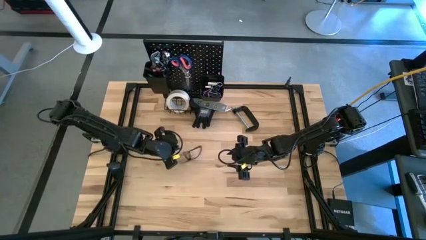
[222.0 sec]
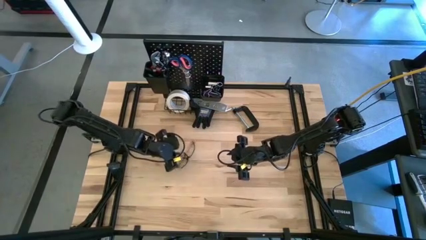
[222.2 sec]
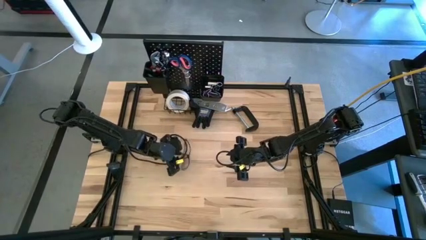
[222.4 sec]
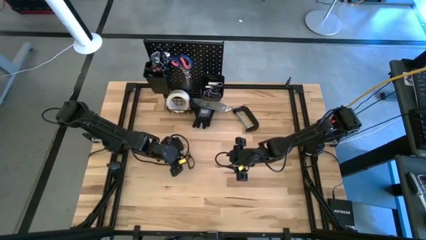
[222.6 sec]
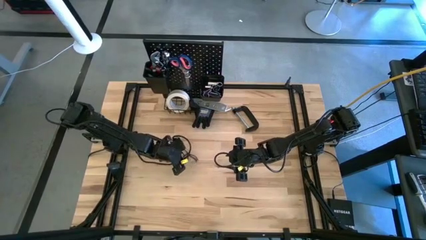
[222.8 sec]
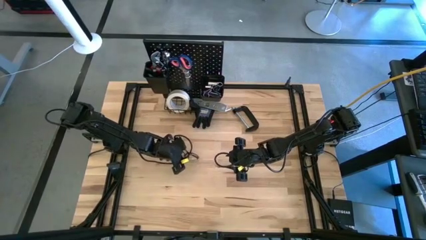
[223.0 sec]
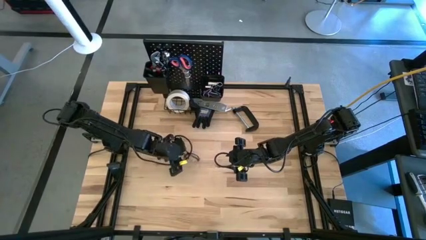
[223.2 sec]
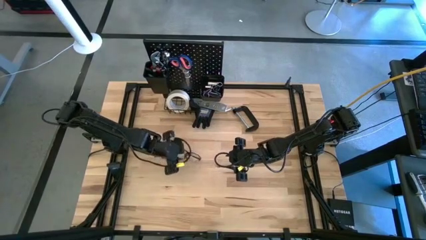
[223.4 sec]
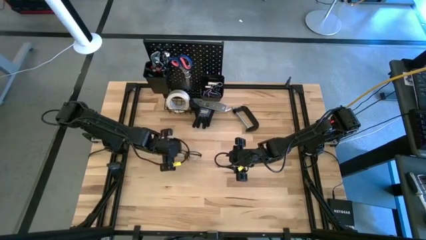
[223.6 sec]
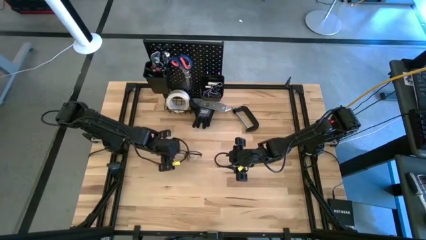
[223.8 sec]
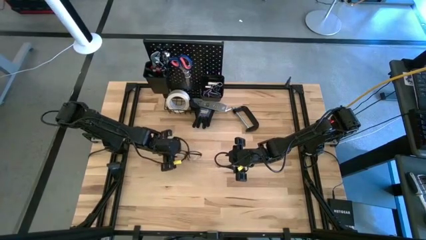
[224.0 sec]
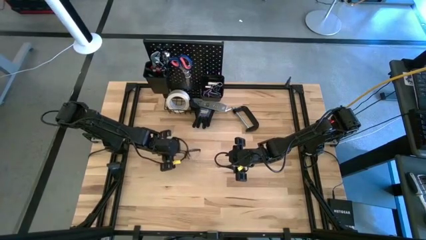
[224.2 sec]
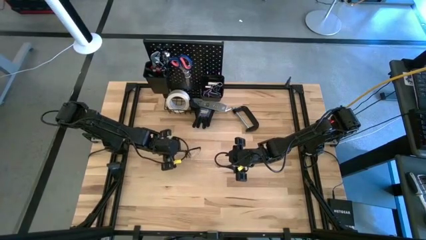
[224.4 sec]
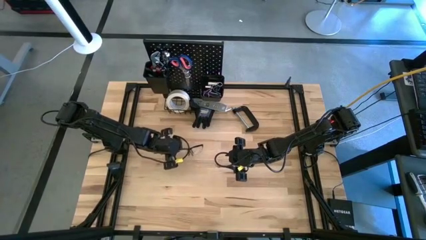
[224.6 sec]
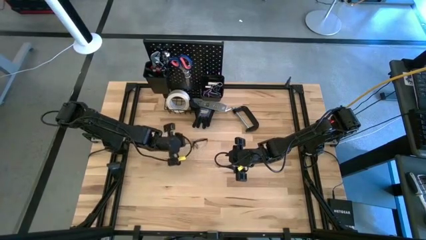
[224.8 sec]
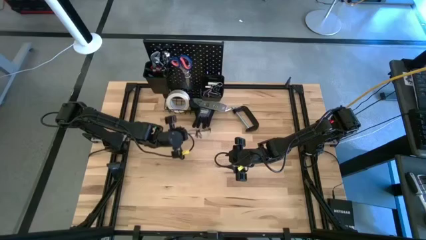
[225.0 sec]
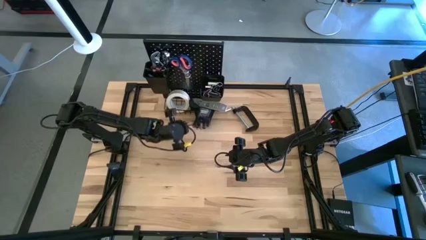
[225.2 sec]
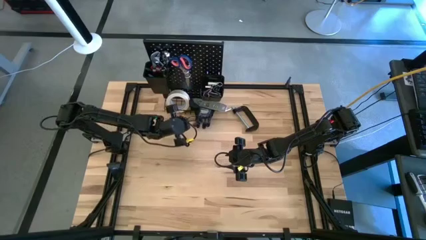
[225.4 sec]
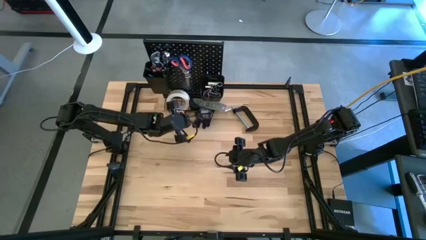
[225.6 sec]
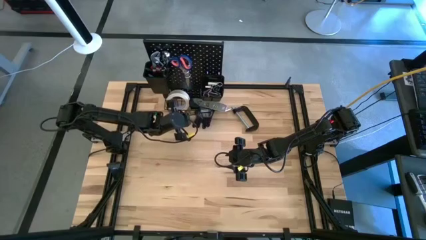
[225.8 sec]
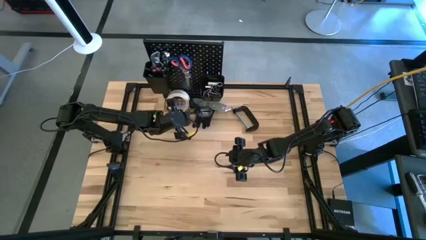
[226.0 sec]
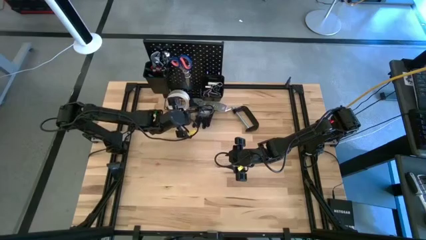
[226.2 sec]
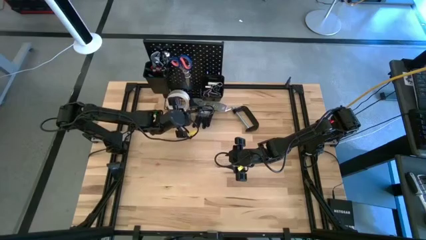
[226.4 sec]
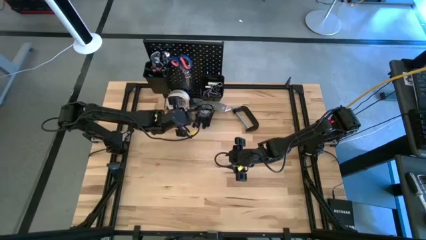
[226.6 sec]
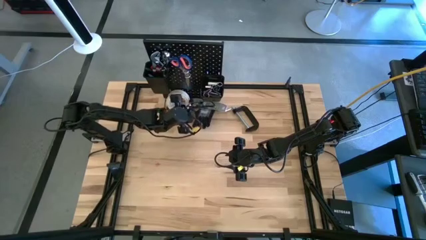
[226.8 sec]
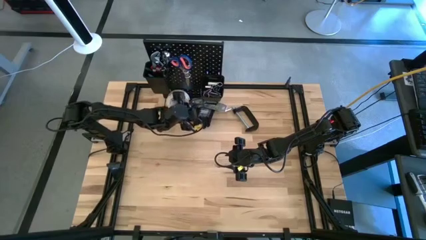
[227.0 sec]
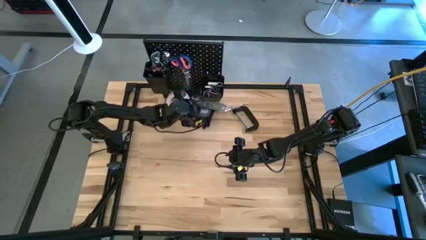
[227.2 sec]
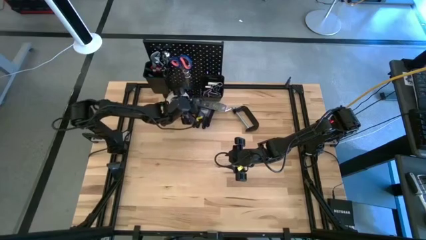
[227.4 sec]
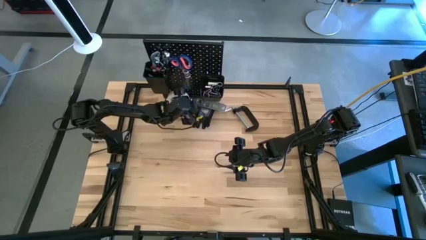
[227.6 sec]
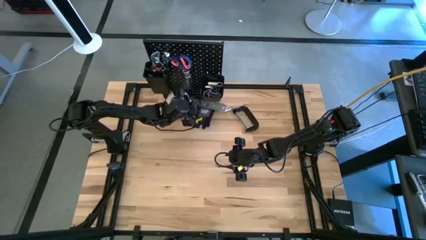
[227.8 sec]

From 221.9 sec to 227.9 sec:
Task: Hang tools onto peg board
Put the safety goggles into the wire basket on the pegboard

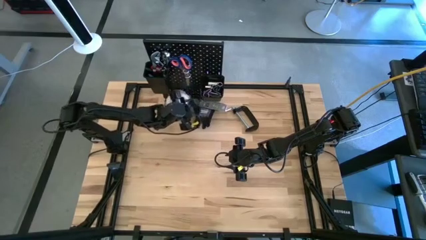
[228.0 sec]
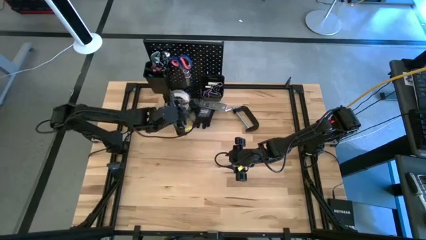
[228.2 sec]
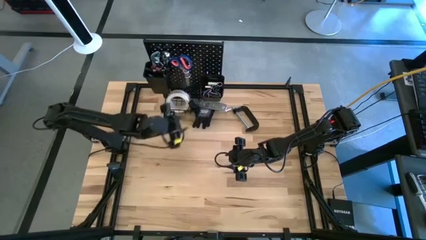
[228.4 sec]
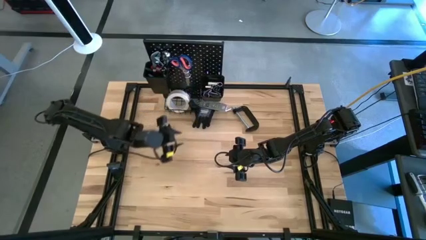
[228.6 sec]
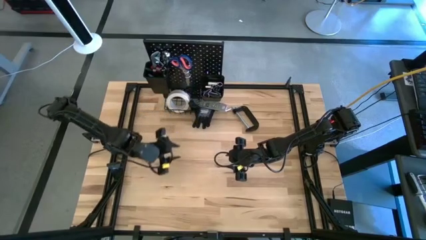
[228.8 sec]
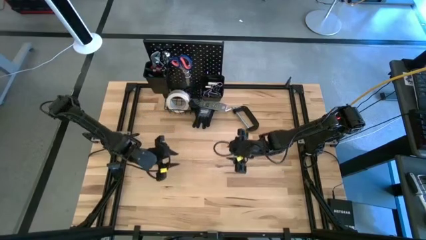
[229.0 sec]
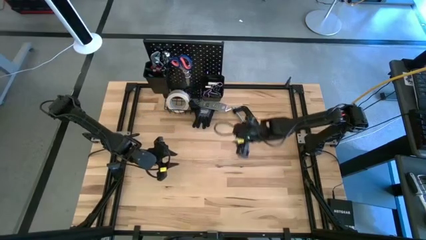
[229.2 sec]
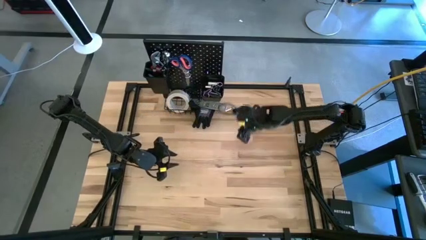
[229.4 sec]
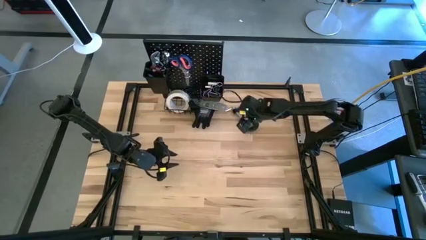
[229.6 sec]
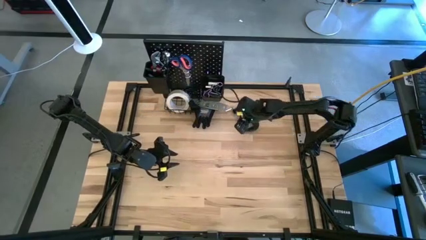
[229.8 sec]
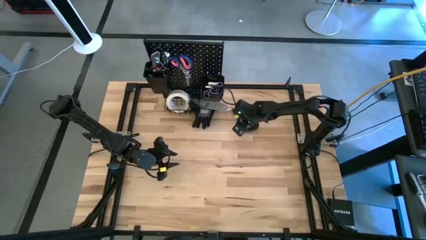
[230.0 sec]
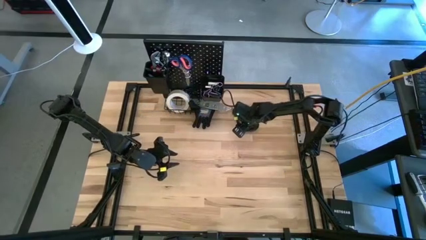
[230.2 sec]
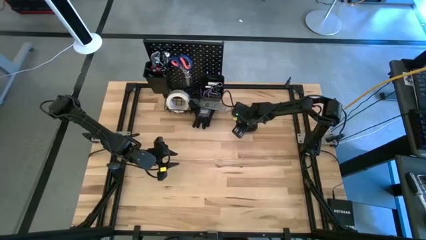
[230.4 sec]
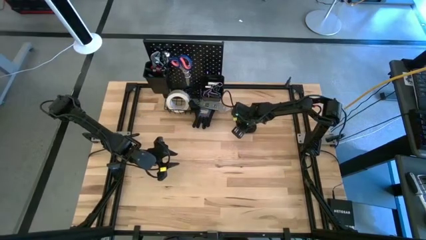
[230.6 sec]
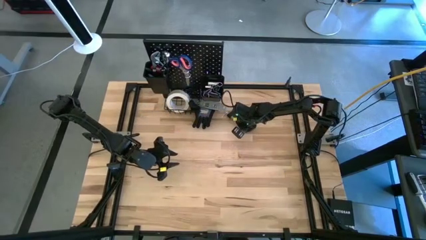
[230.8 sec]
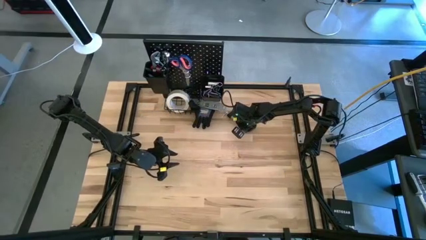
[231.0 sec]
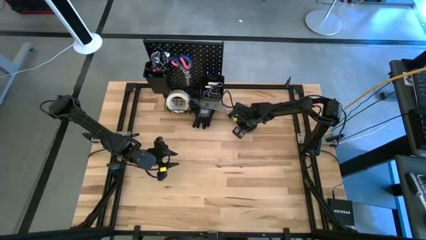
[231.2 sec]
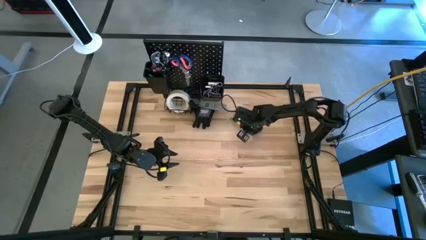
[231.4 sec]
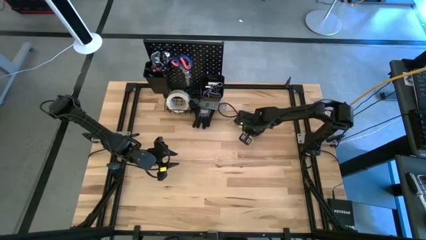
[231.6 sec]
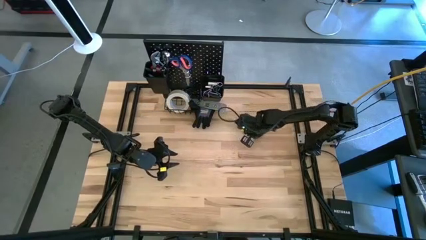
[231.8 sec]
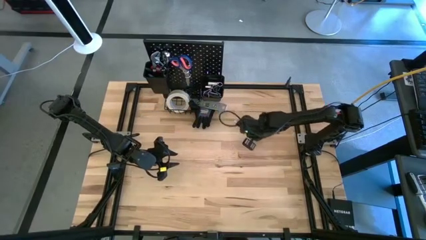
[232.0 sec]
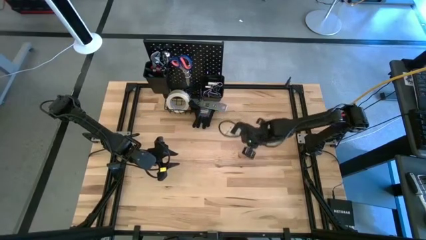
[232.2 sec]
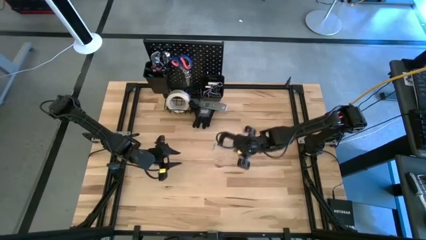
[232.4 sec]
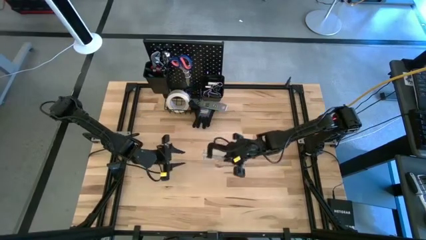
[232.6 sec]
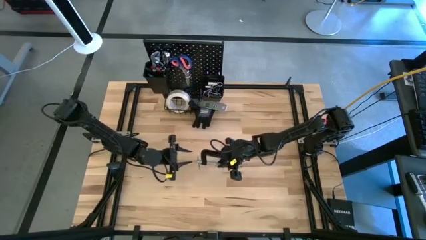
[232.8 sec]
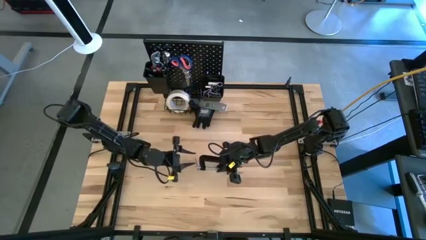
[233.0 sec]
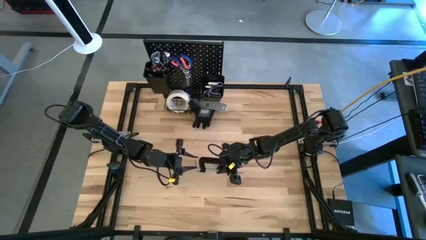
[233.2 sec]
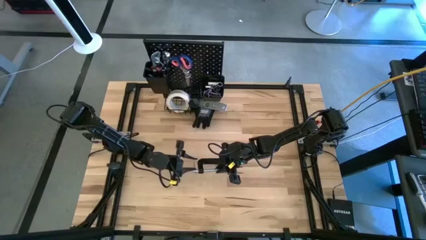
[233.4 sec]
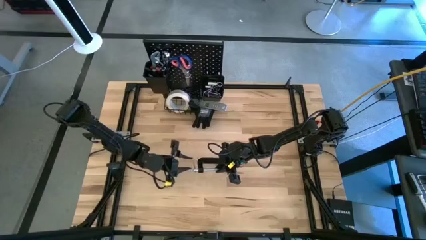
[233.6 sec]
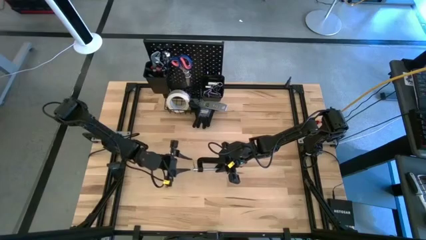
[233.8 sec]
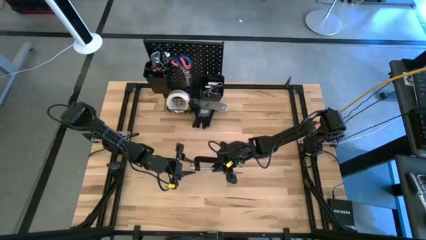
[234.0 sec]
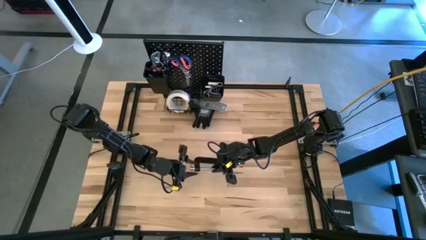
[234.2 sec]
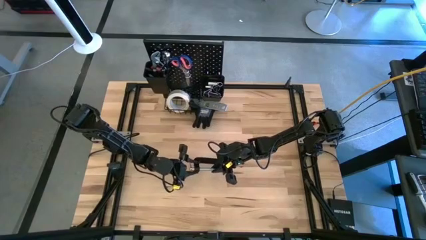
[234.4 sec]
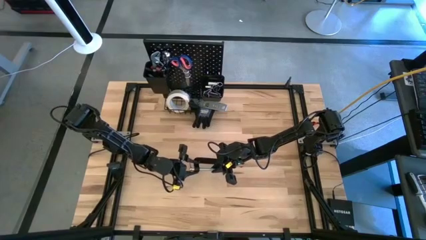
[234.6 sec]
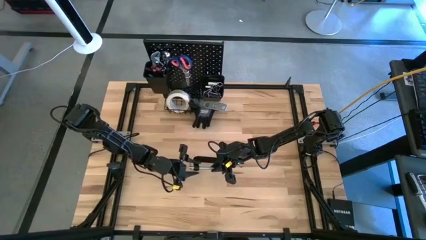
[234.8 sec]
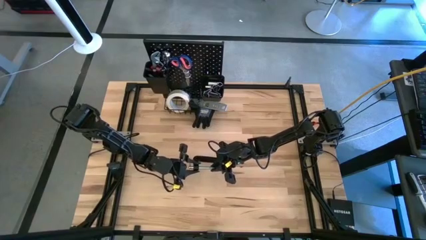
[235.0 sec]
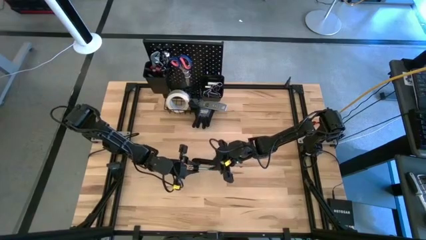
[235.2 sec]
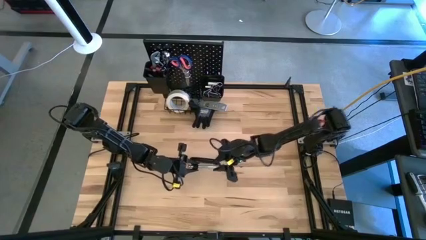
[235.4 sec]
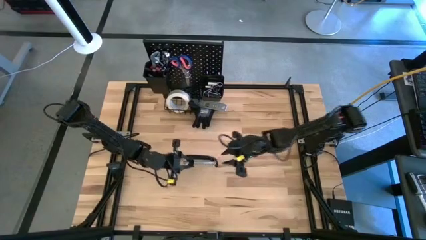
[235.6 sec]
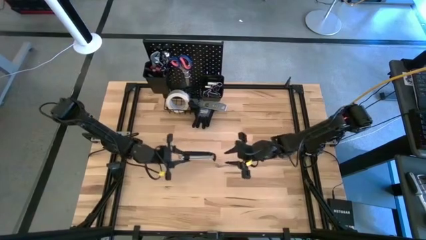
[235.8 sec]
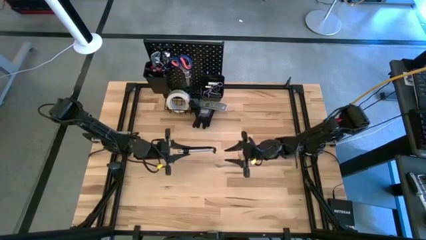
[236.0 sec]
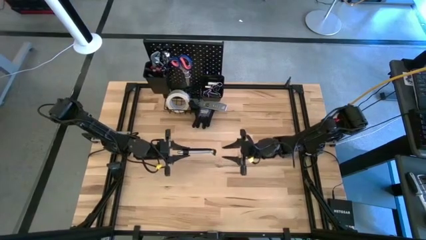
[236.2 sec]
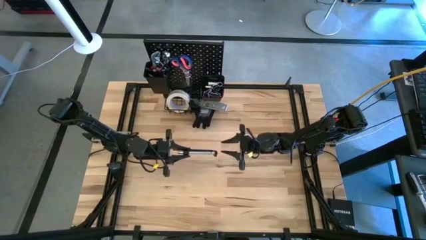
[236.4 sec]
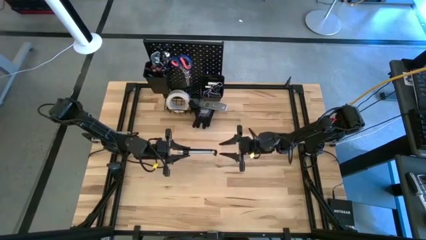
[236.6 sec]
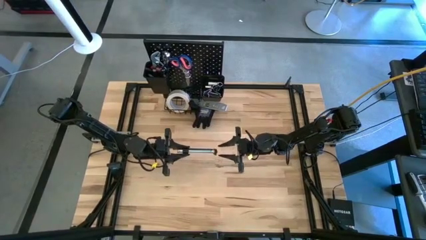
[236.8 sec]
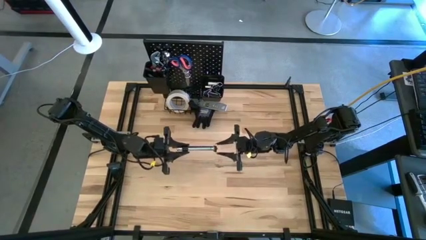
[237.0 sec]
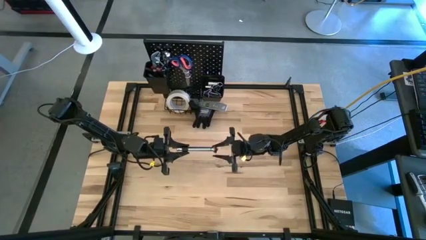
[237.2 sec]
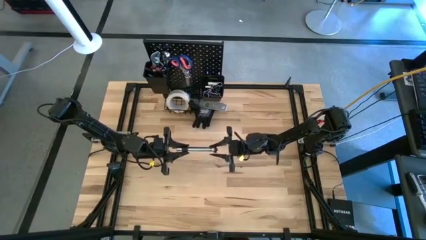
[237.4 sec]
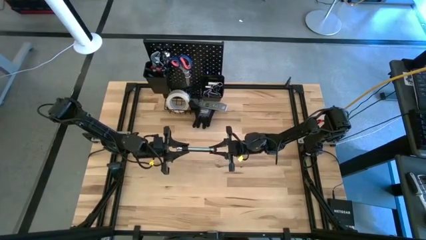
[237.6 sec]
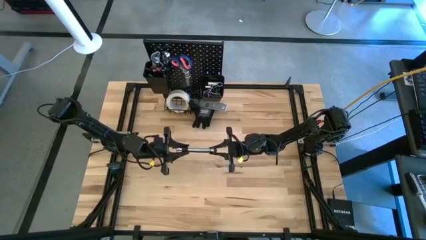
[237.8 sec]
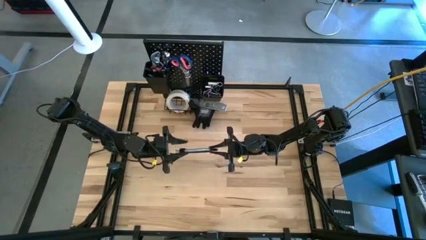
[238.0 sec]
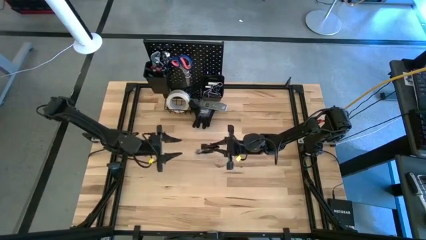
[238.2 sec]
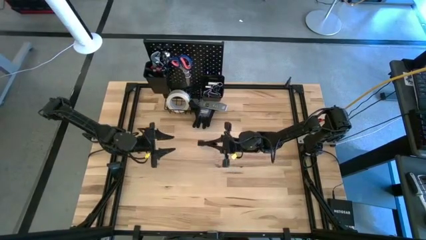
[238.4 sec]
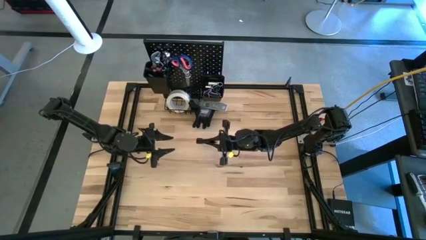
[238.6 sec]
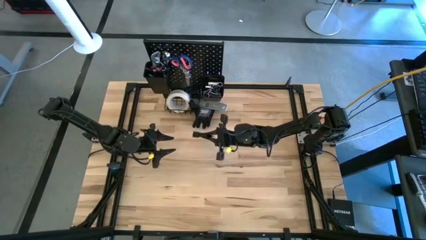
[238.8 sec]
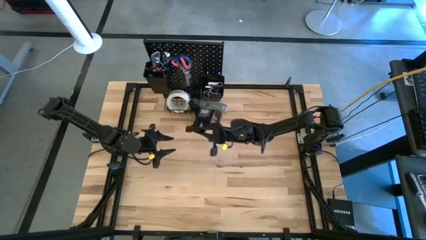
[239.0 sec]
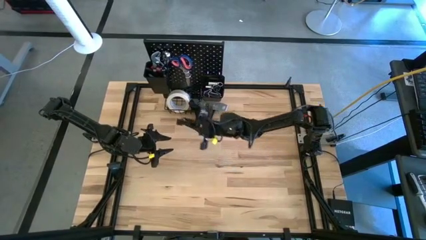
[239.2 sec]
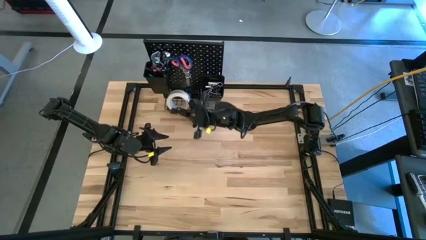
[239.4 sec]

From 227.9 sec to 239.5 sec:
Put the clamp into the wire basket on the pegboard
